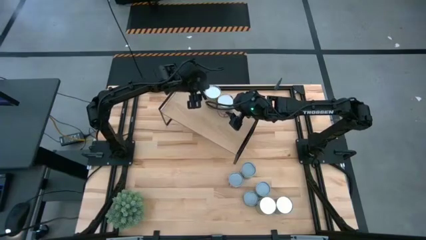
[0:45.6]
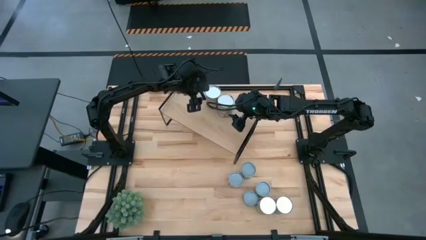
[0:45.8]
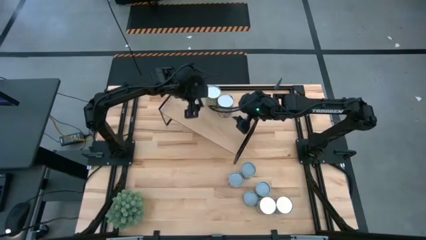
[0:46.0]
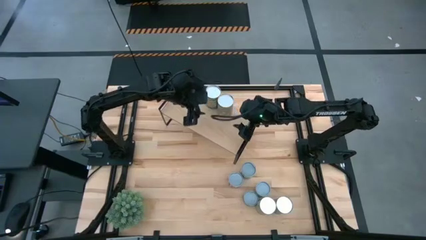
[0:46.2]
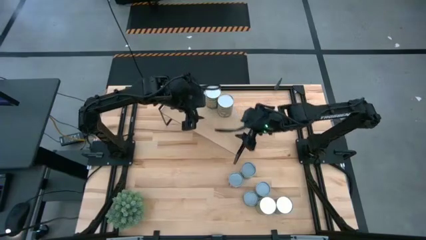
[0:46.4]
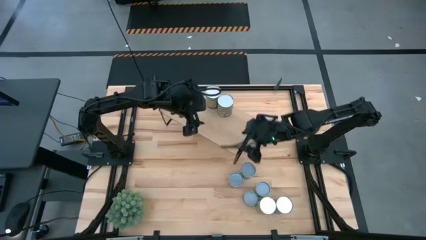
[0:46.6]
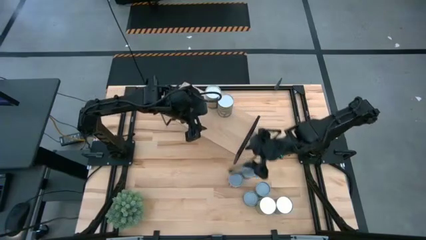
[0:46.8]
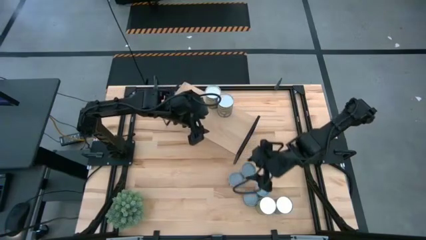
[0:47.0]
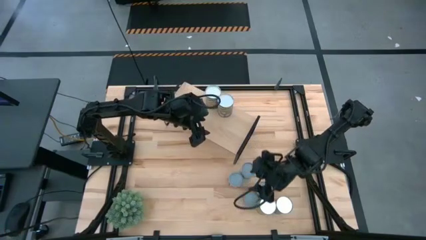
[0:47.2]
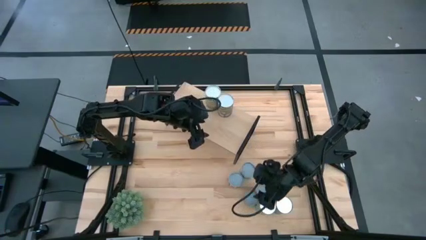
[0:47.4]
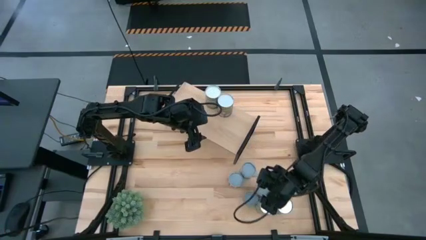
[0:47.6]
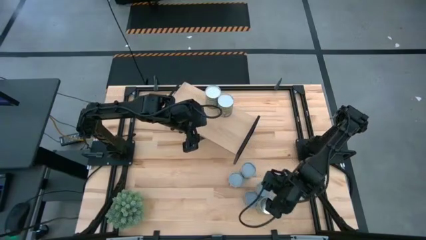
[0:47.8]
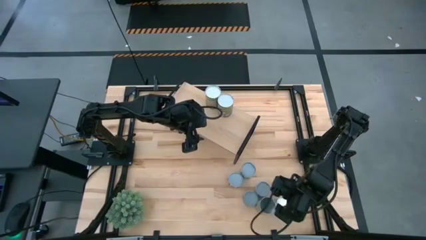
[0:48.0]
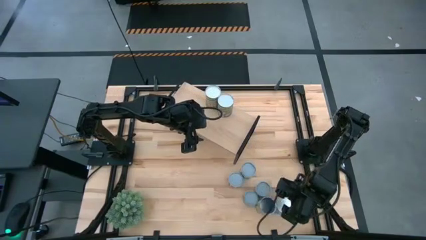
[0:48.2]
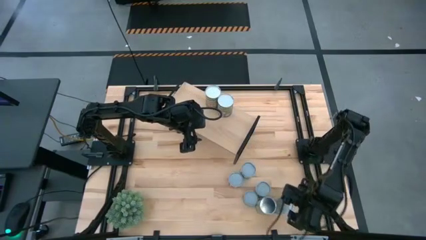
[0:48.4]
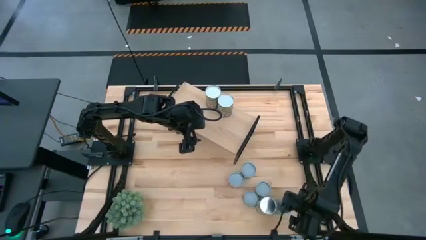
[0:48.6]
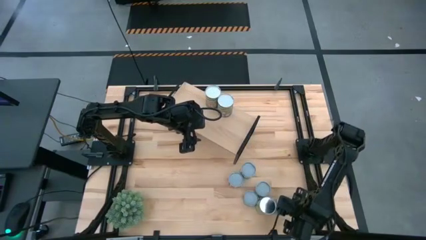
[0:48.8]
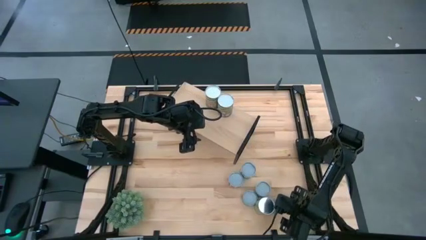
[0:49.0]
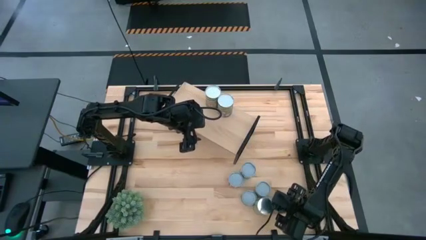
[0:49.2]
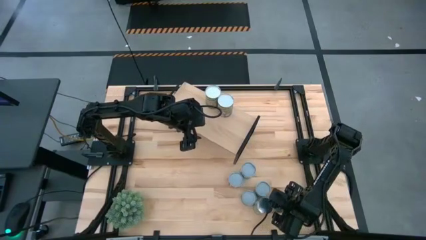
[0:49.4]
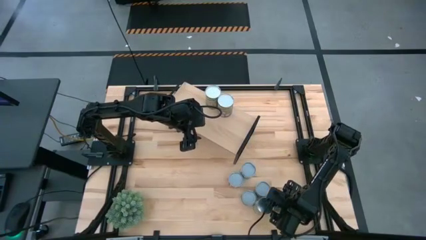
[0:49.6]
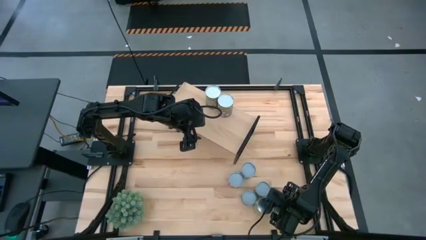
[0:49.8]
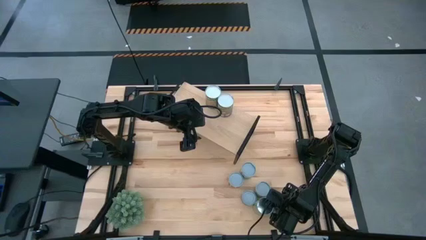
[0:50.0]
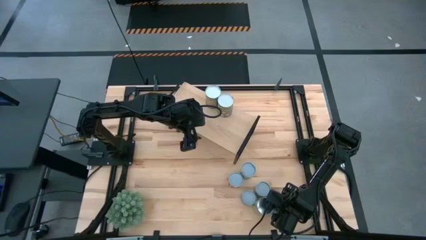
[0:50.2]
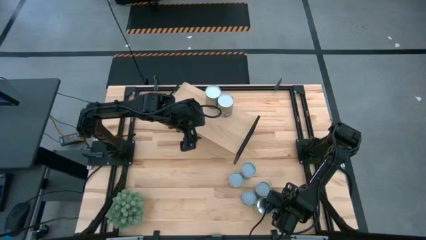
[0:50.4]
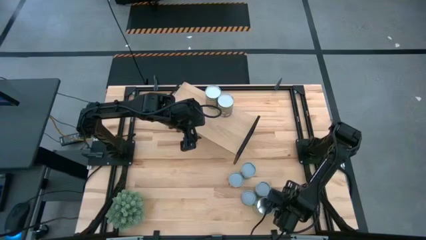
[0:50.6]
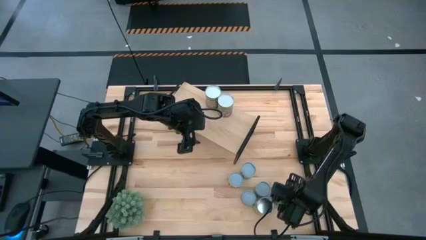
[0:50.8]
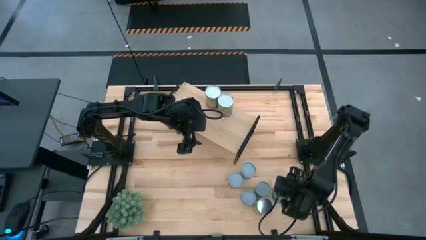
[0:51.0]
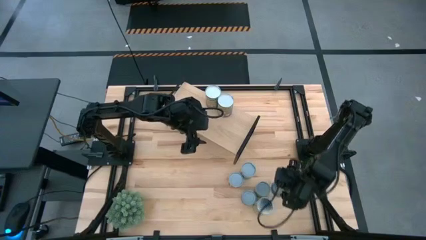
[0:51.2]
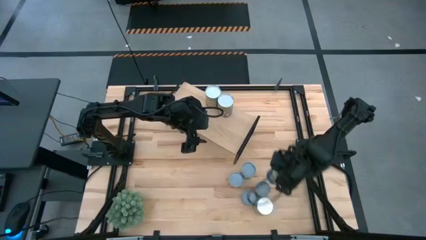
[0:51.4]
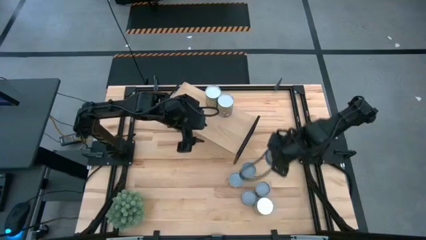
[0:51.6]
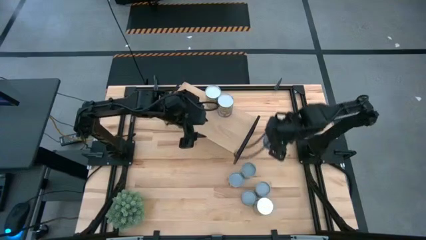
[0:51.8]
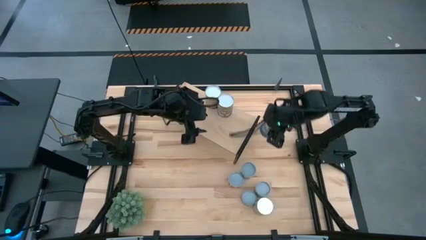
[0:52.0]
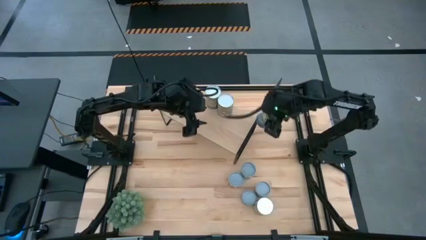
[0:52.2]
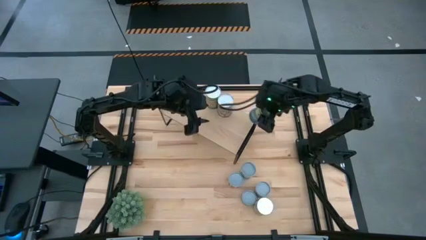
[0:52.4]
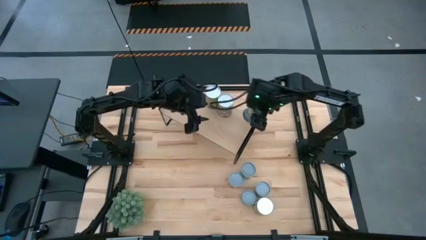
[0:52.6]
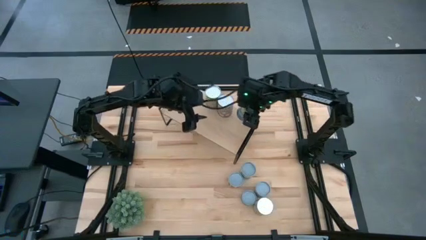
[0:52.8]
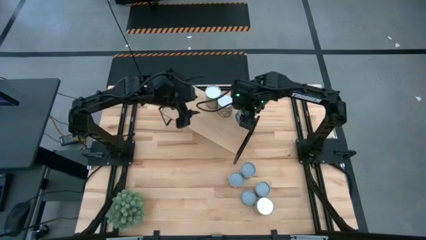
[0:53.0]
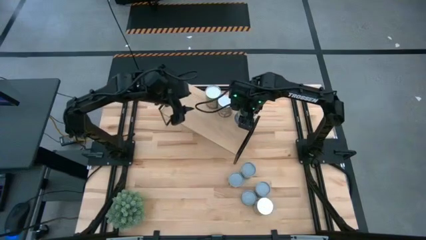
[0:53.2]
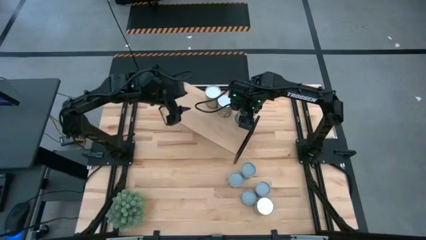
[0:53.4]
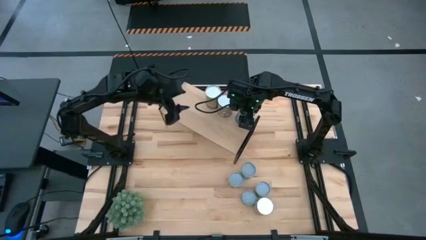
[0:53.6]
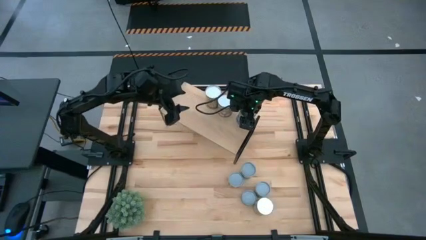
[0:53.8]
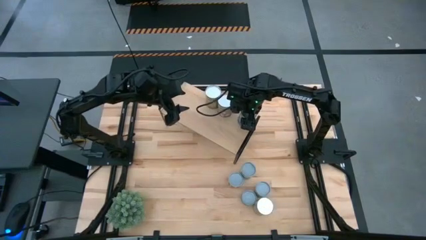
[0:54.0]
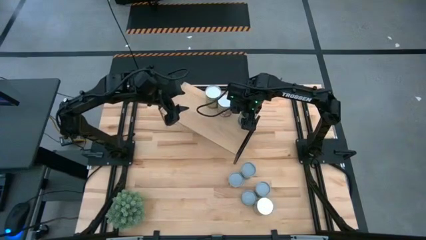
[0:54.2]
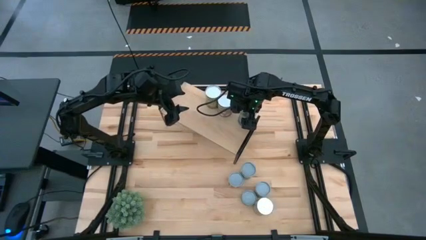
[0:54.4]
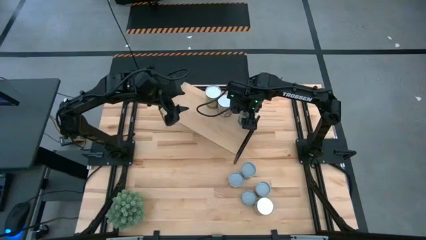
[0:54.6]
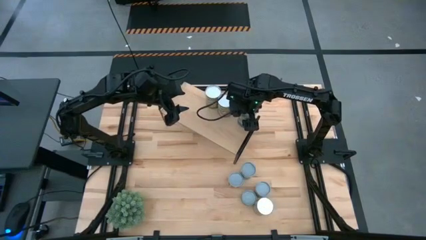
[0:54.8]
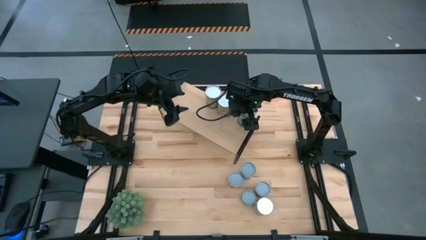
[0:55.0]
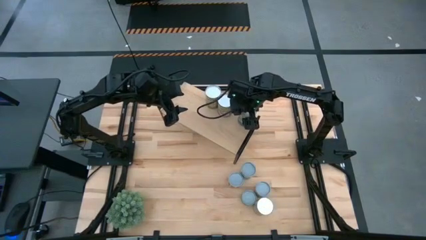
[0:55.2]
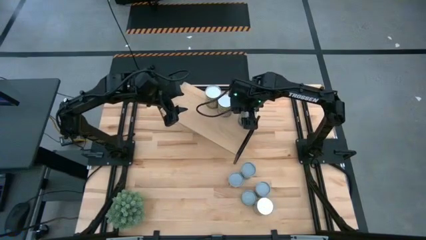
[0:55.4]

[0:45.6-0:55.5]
Task: Pick and place cans onto a shelf
Put the canned peas on the shelf

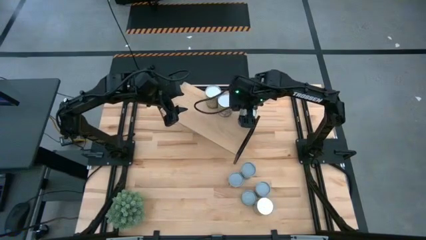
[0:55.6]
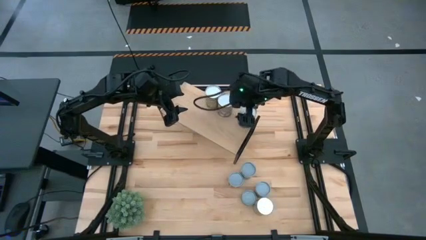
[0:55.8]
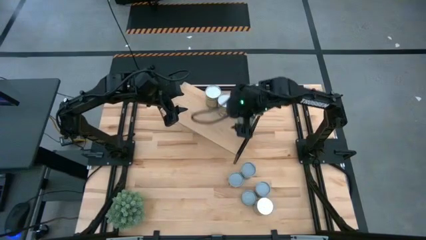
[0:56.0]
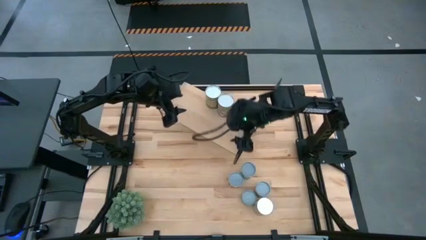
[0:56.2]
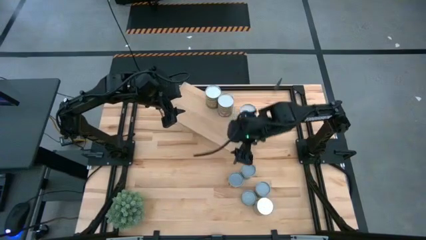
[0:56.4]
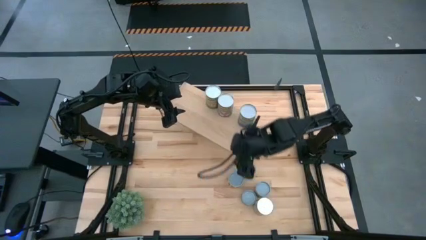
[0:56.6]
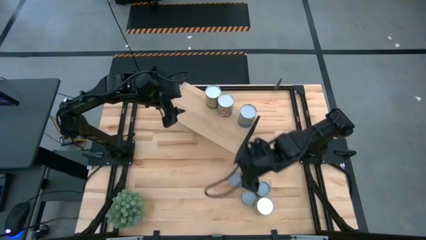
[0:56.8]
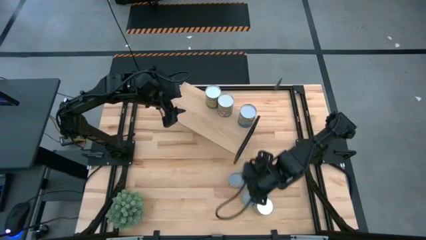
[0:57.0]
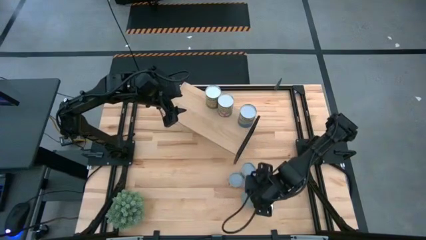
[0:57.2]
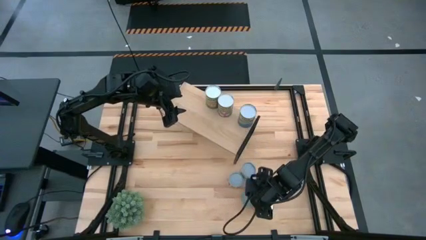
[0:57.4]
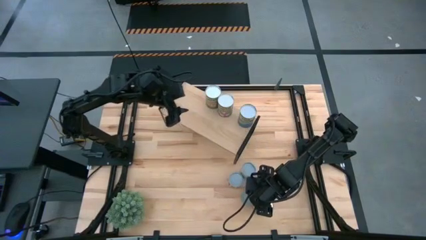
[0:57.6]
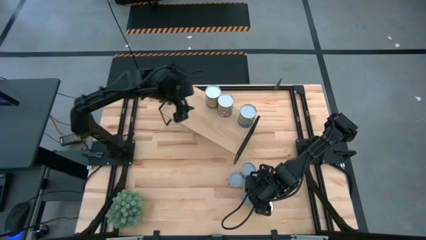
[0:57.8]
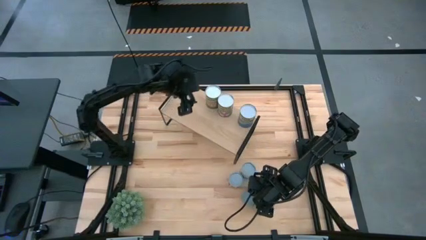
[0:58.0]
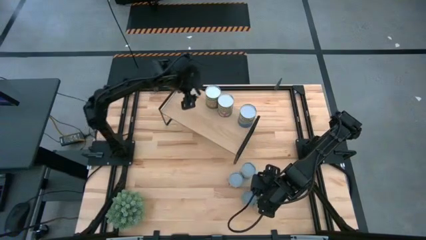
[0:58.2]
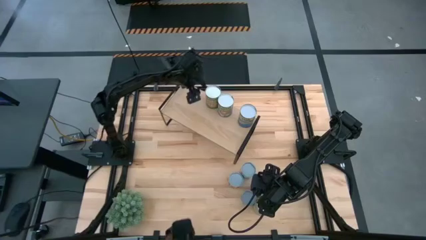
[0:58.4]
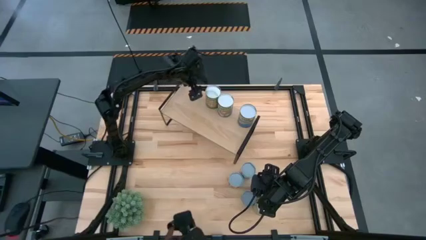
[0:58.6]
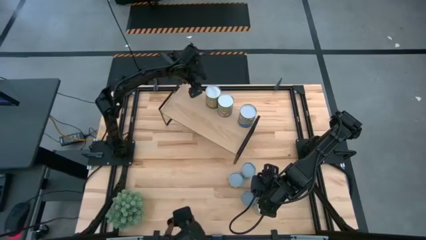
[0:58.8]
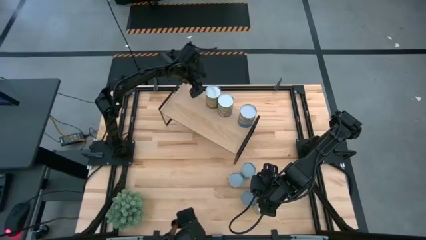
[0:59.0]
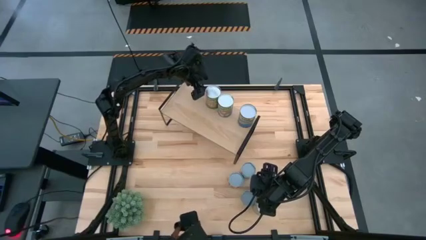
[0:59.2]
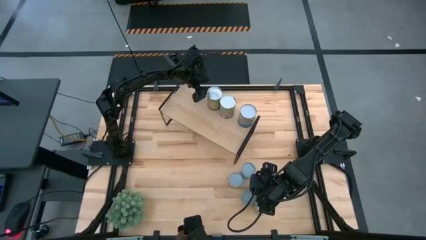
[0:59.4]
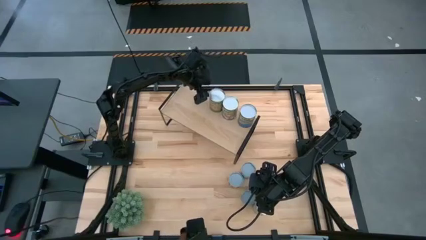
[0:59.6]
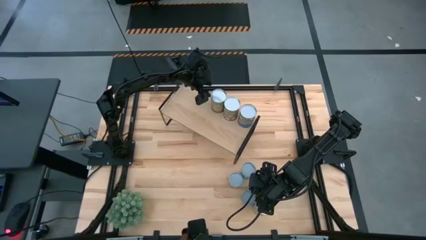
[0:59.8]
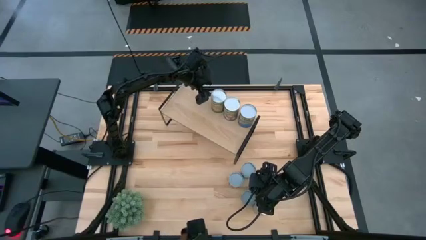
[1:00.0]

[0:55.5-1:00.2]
Adjust the canned orange
